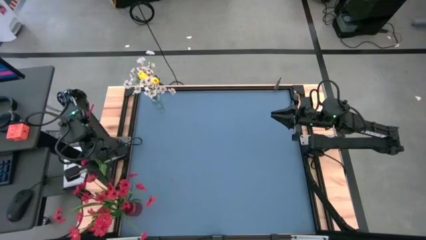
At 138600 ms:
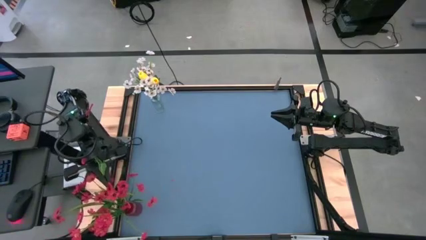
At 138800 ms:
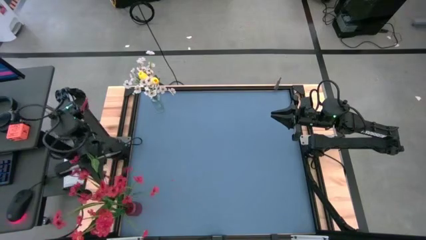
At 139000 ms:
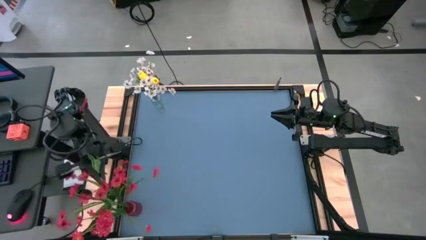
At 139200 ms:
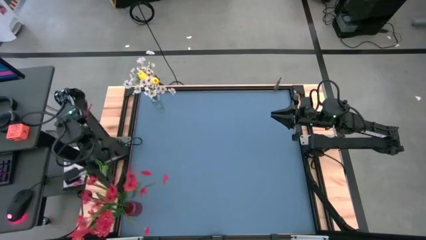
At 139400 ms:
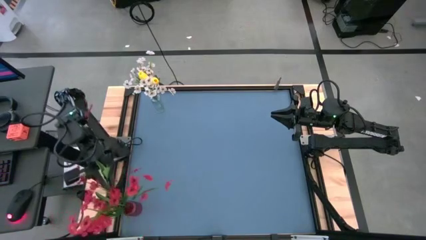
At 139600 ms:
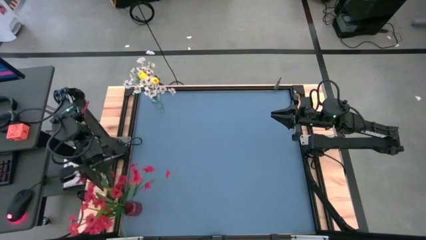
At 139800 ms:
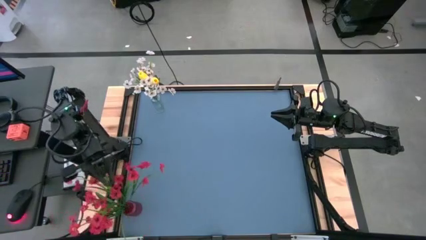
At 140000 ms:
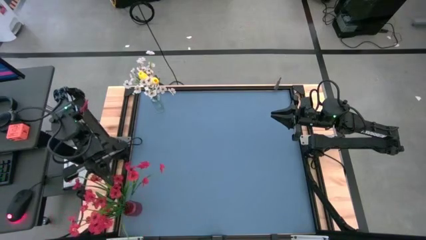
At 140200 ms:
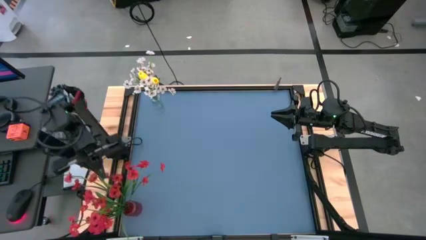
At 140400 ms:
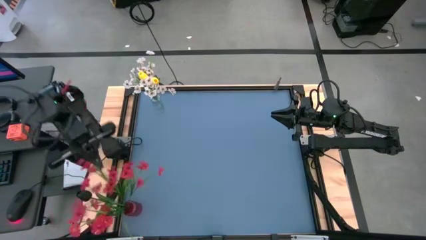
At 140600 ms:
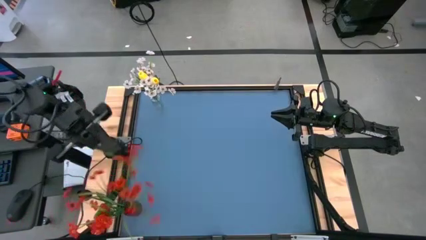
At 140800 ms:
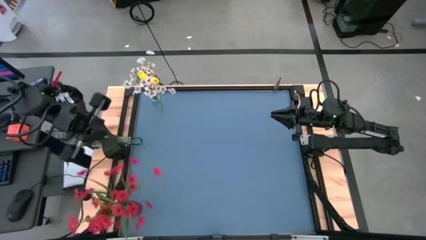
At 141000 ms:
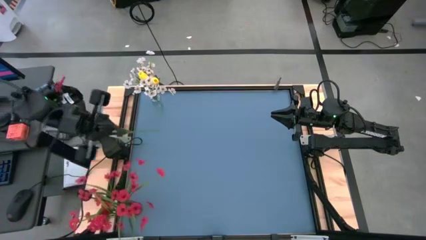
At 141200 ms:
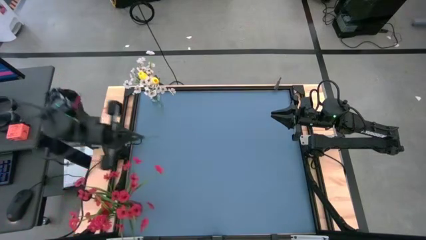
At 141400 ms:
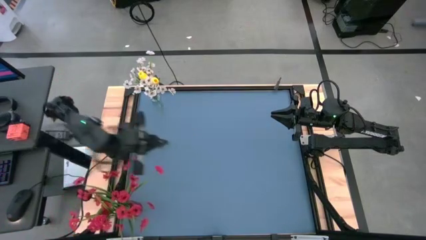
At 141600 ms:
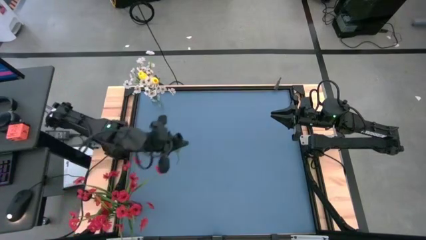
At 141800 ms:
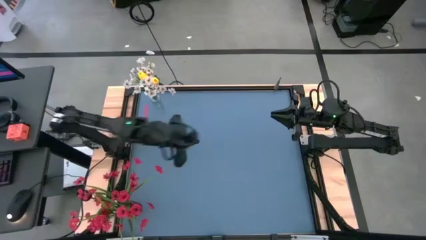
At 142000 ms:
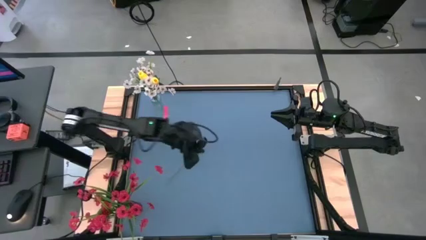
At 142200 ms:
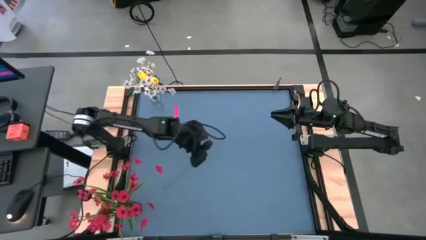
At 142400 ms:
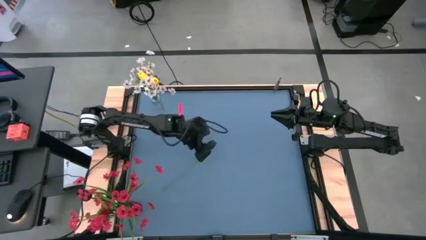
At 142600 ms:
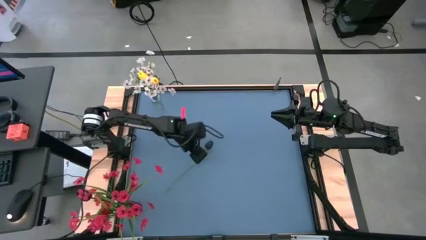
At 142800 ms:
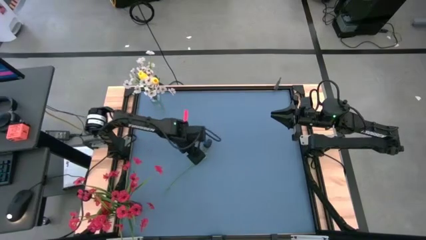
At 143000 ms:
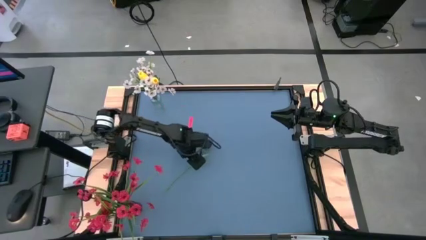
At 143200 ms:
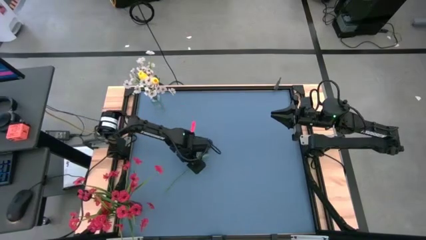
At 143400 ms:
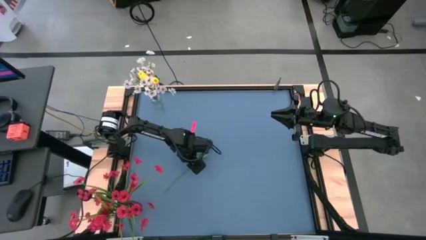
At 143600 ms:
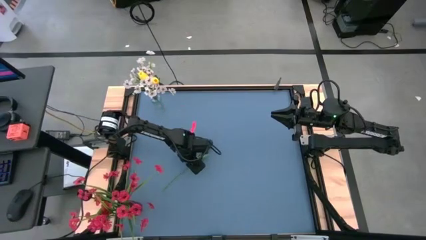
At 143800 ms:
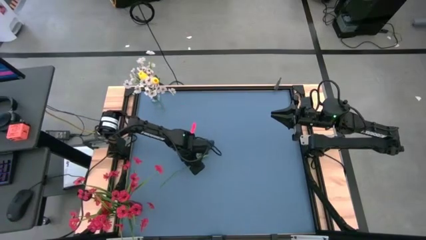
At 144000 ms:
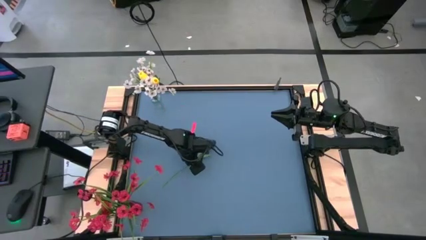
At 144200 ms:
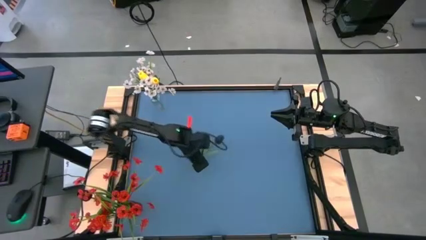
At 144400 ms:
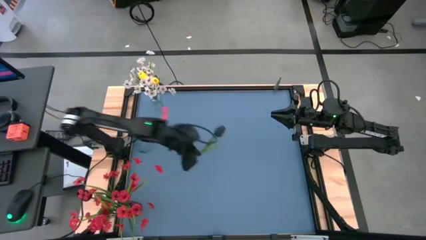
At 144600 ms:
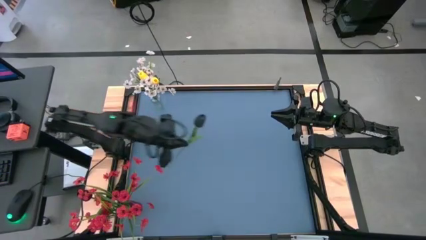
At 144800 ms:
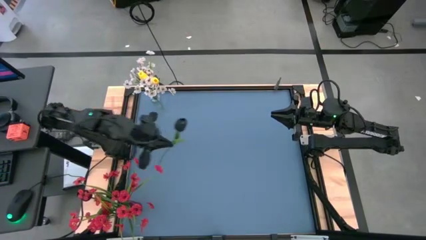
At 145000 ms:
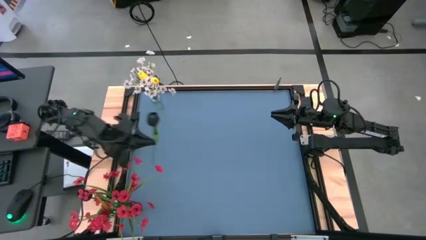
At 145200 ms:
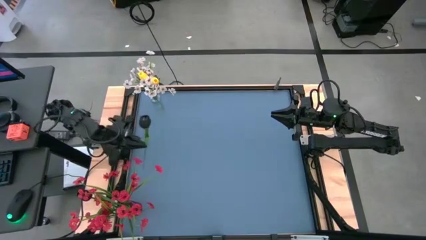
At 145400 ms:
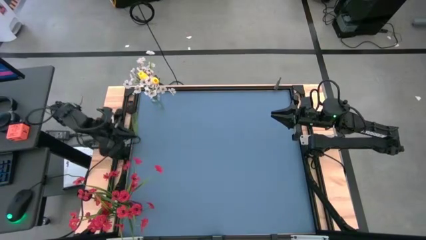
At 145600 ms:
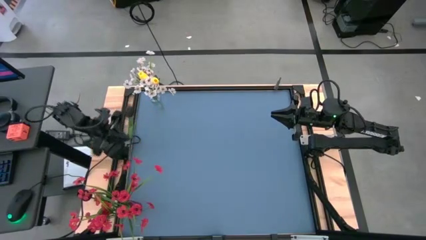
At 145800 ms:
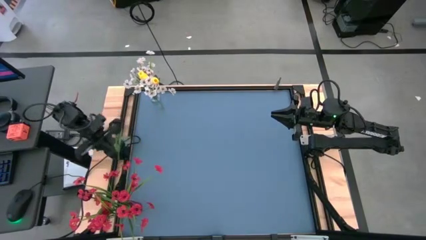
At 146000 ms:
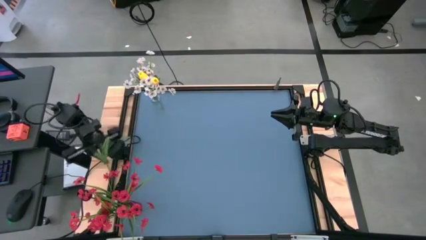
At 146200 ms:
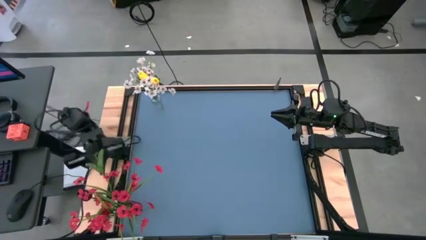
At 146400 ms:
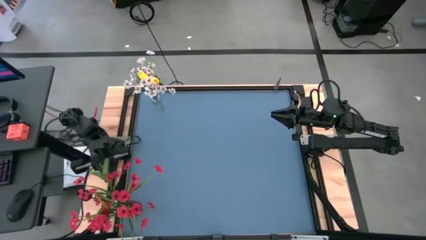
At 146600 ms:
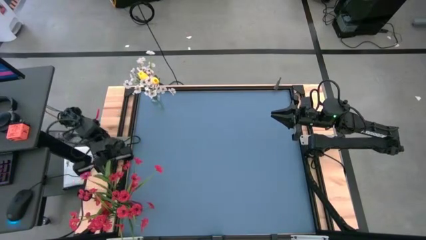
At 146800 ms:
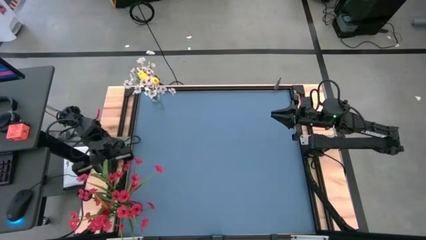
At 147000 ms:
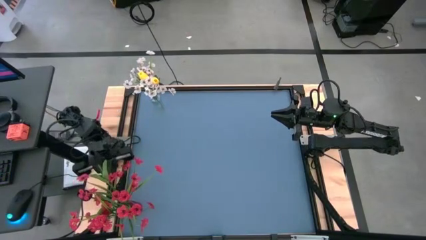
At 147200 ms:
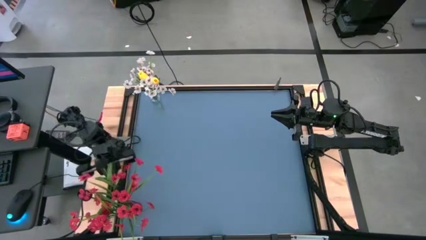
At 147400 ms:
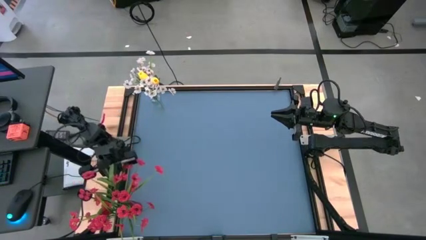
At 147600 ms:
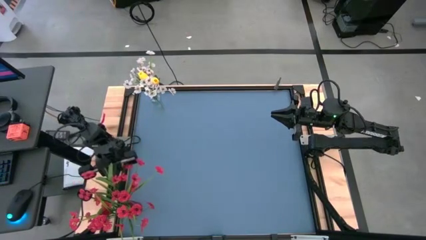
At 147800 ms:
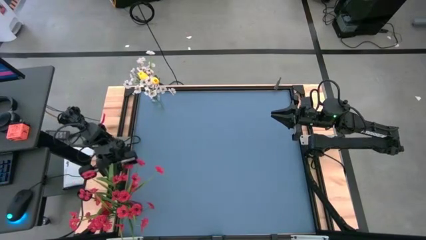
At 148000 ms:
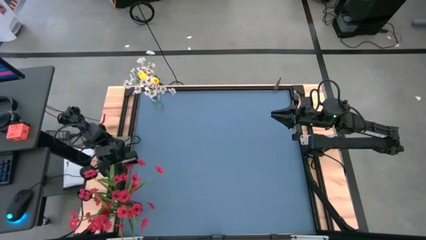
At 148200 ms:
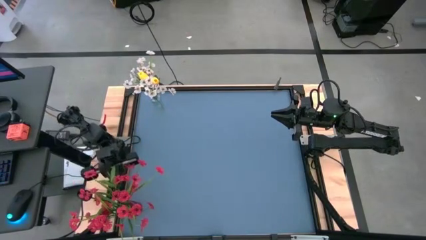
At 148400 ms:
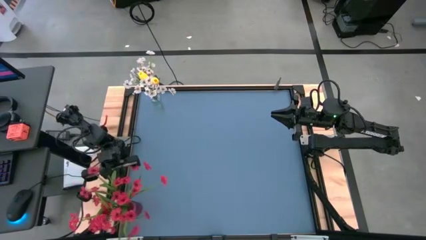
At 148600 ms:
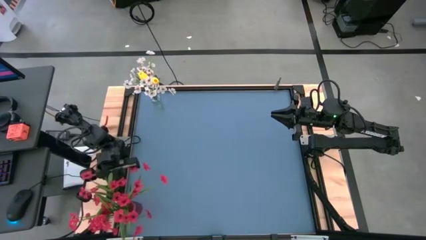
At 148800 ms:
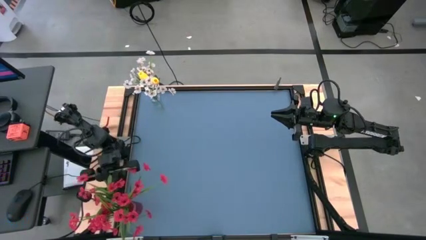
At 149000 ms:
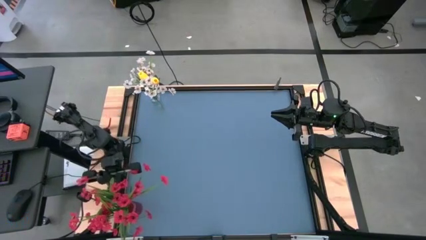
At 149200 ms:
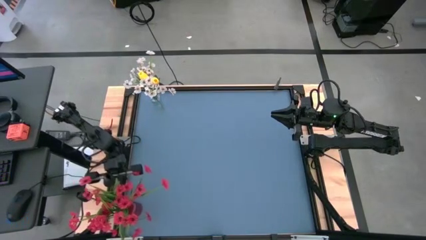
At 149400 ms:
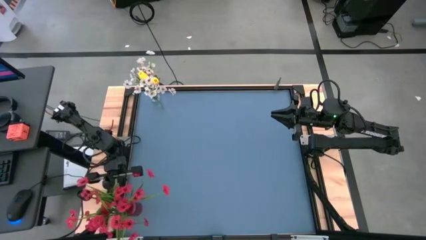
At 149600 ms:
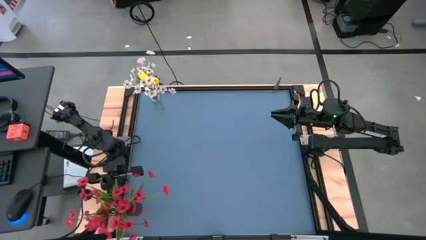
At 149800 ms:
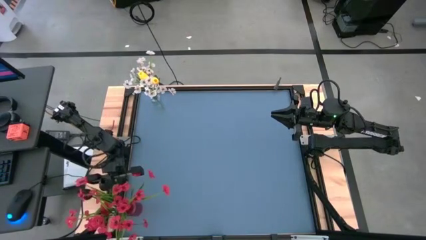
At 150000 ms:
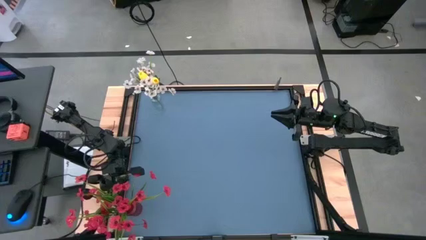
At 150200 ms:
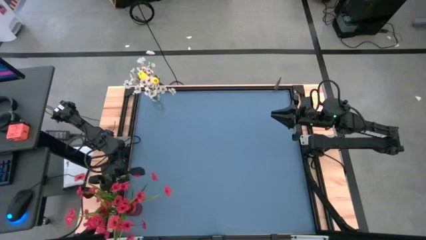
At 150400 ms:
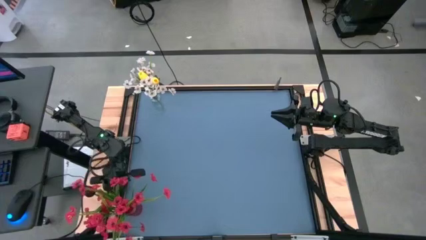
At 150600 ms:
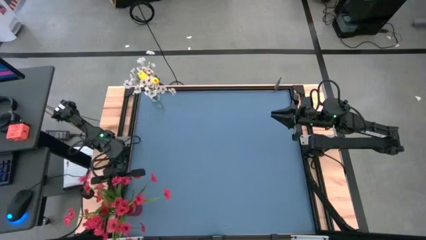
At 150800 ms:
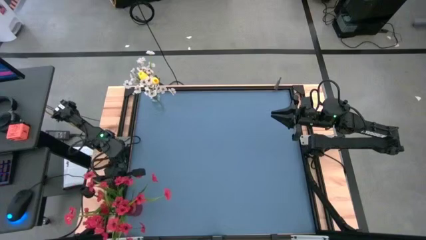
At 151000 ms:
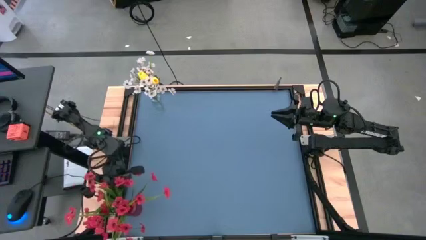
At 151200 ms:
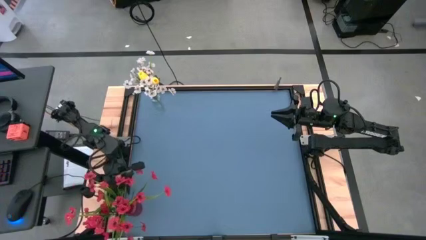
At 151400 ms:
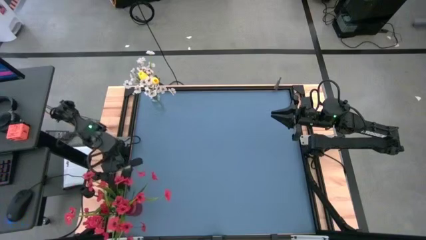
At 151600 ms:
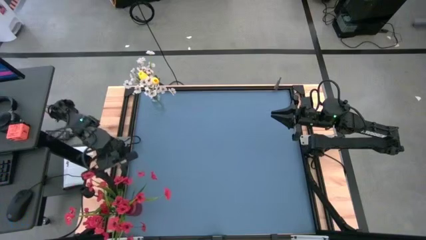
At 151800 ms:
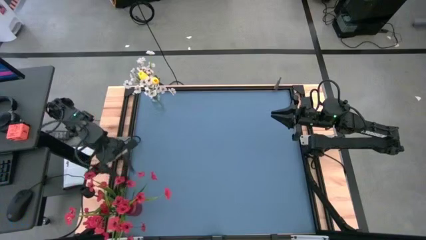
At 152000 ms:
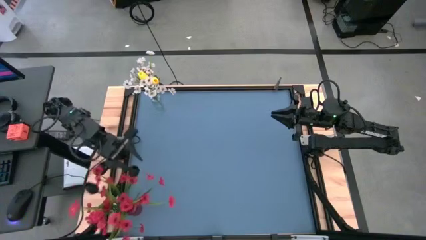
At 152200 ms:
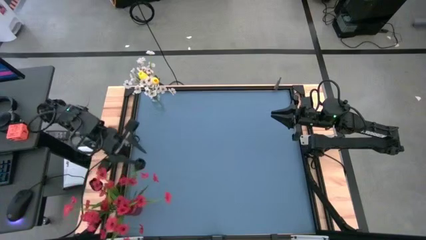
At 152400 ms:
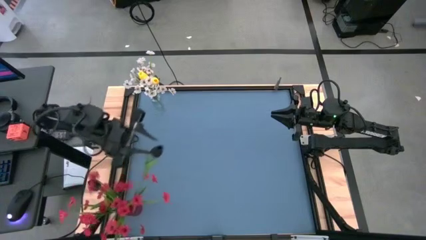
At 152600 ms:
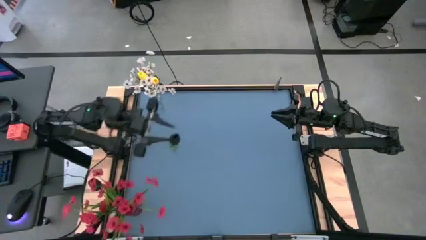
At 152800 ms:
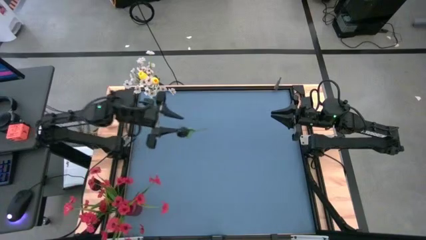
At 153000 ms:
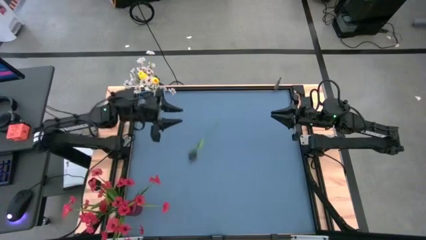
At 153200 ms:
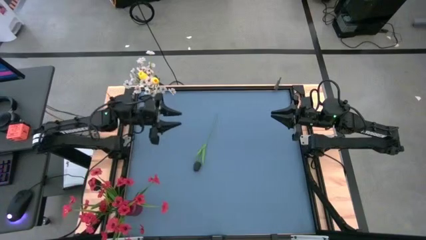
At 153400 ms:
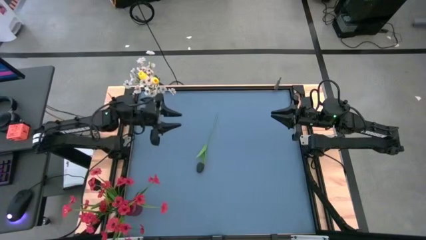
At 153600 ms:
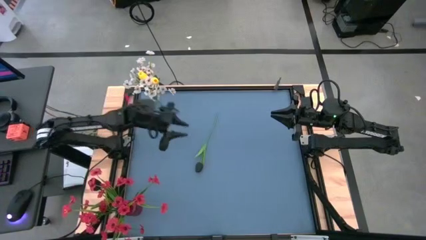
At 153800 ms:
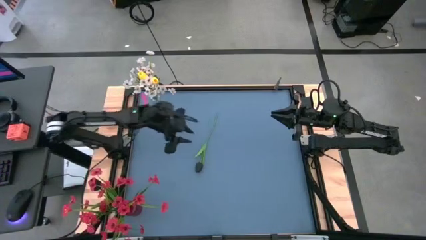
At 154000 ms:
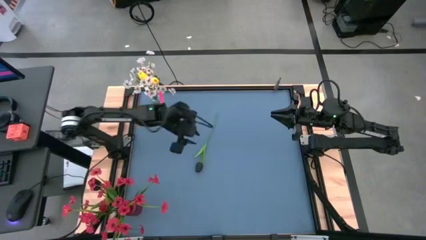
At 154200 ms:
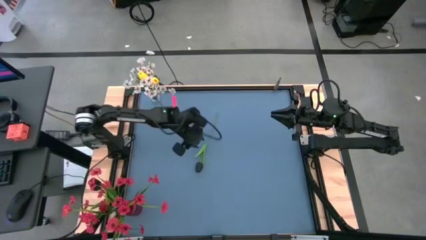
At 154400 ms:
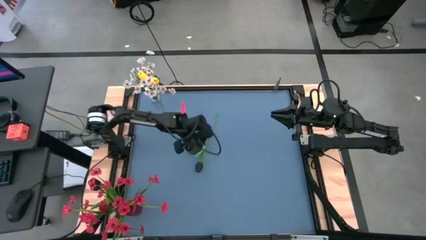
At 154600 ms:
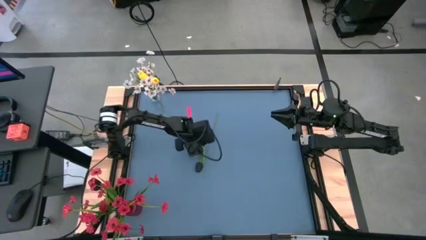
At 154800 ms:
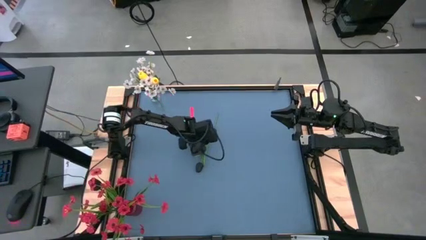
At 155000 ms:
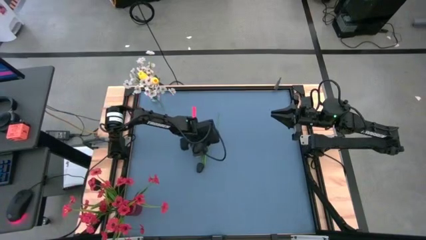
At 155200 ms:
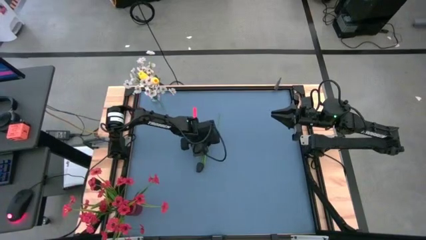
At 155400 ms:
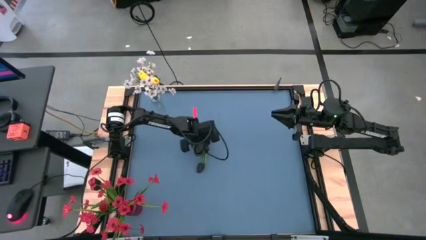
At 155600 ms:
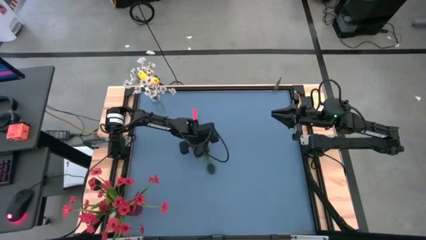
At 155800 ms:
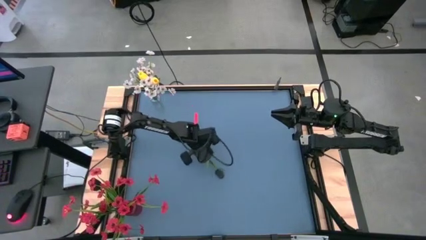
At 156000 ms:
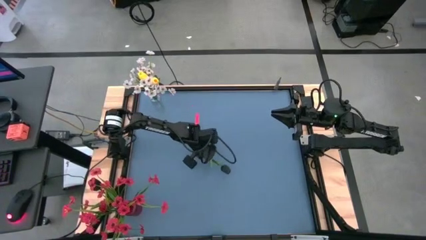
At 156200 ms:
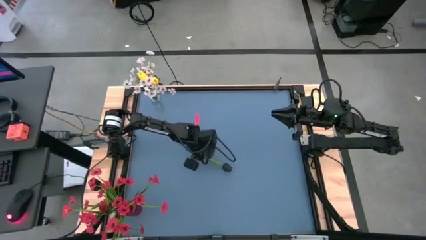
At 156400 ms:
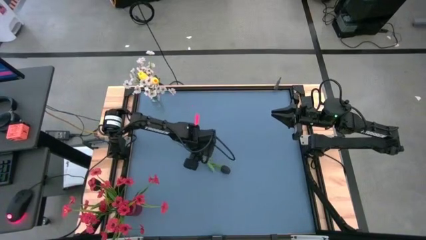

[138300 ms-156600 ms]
Task: Sort flowers into vase by color
Put the black flower into the red vase
